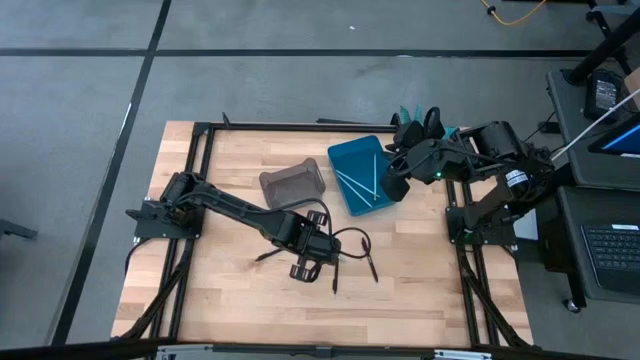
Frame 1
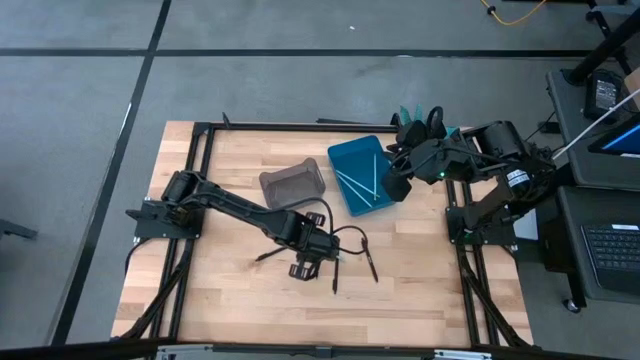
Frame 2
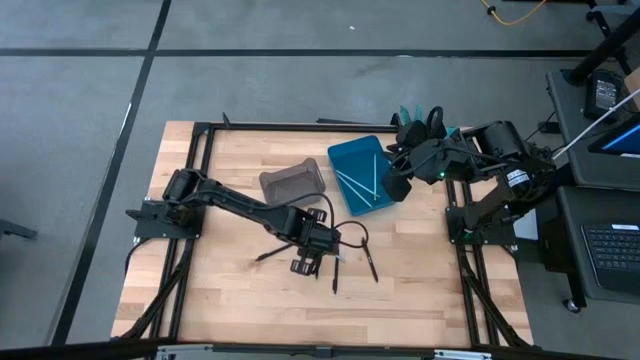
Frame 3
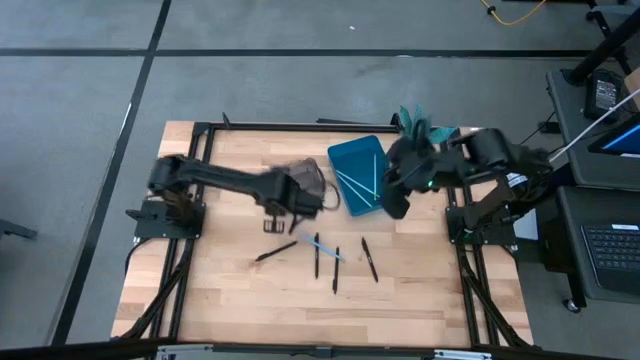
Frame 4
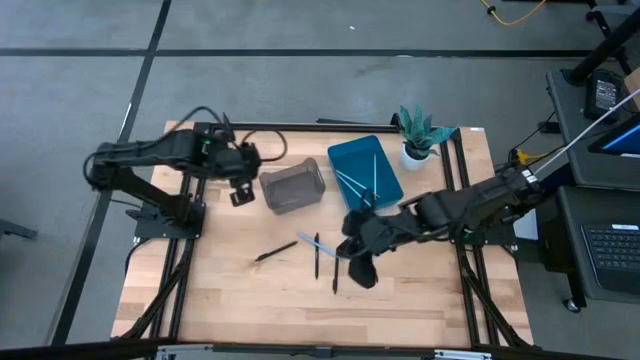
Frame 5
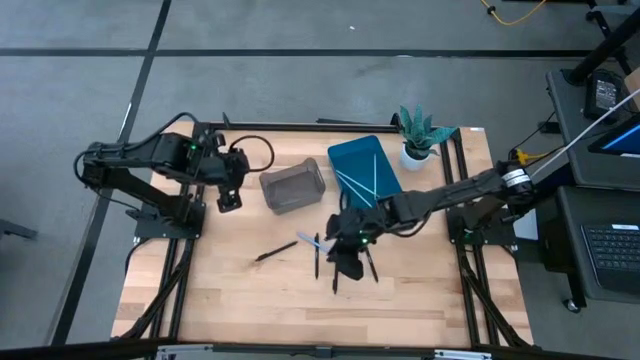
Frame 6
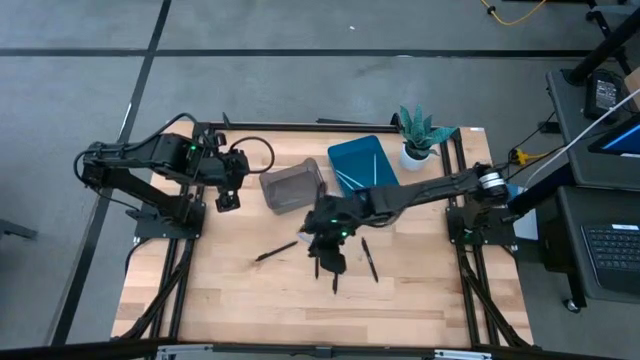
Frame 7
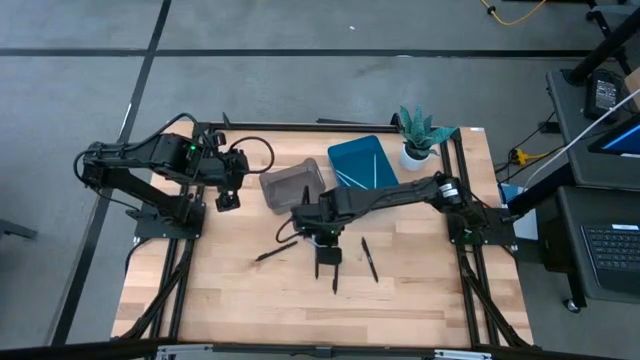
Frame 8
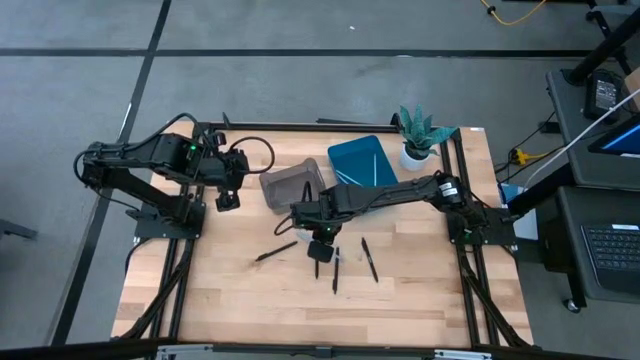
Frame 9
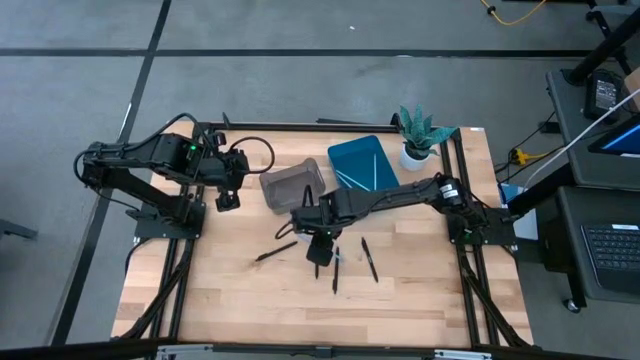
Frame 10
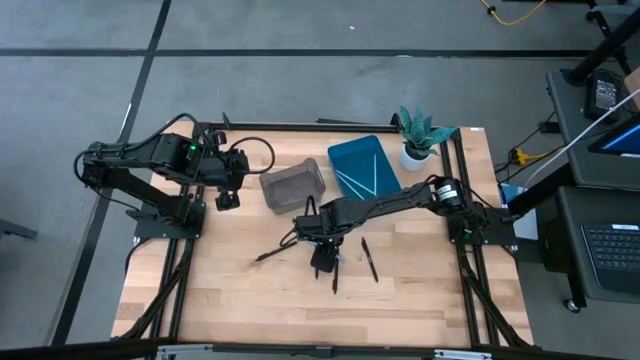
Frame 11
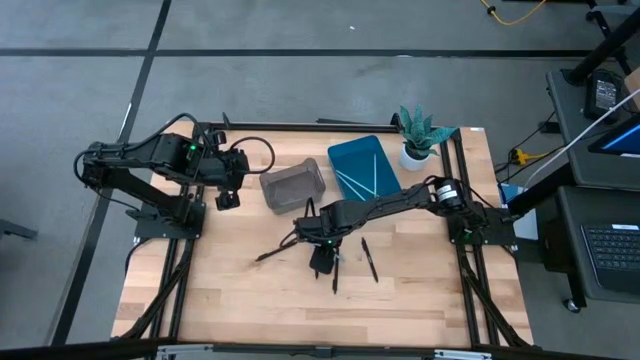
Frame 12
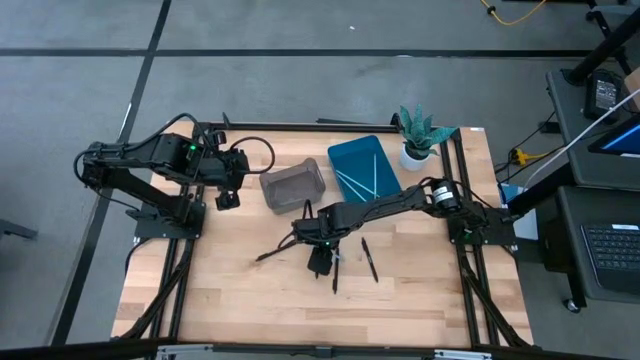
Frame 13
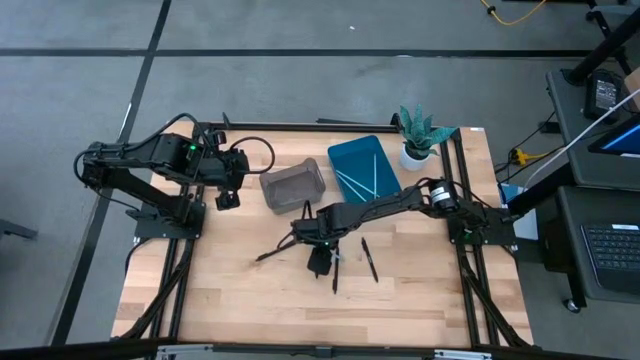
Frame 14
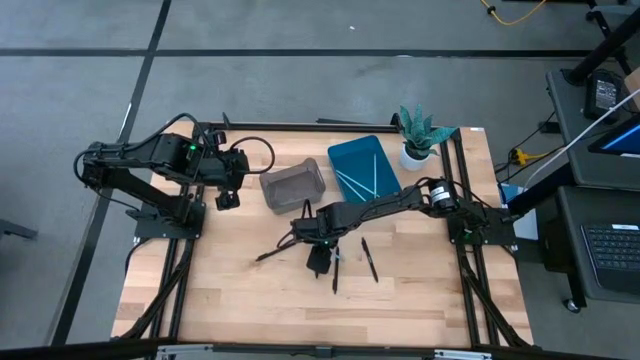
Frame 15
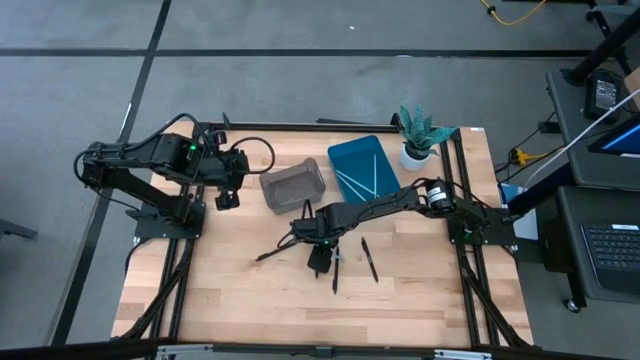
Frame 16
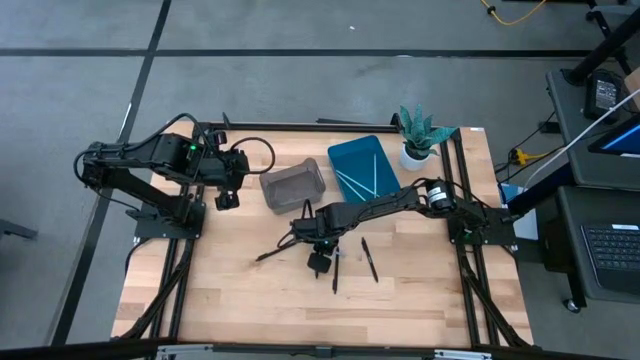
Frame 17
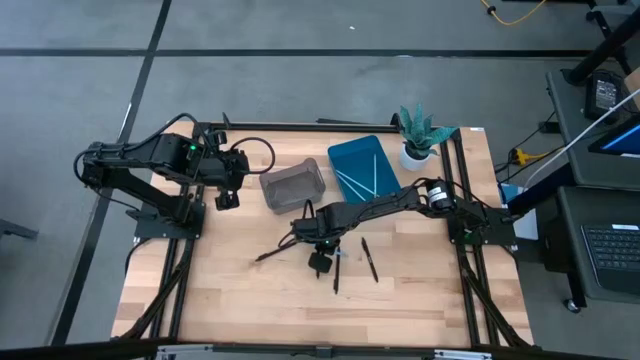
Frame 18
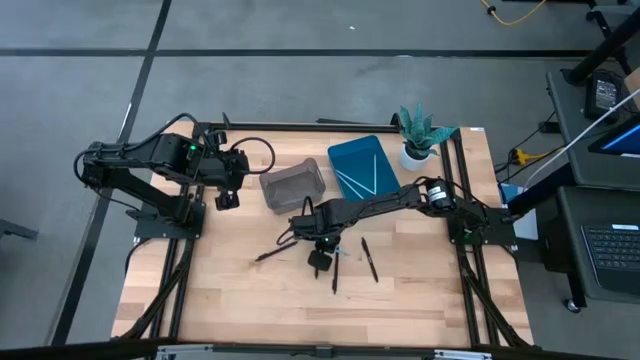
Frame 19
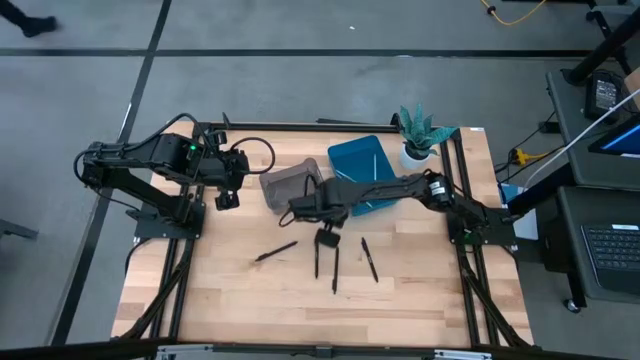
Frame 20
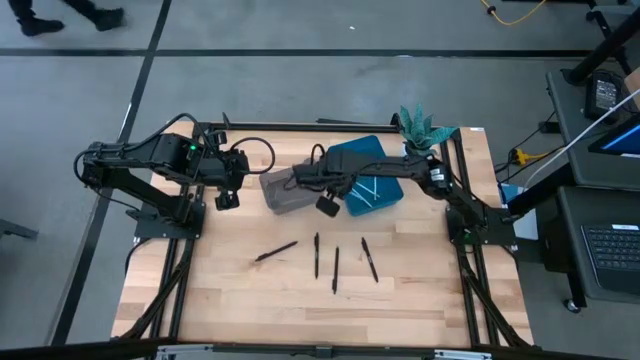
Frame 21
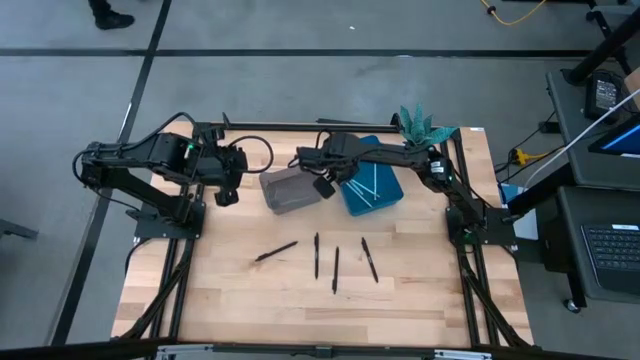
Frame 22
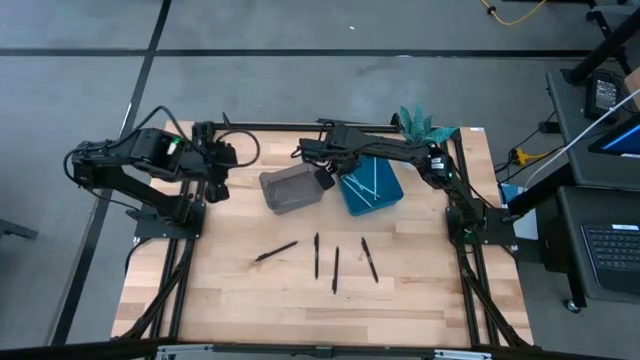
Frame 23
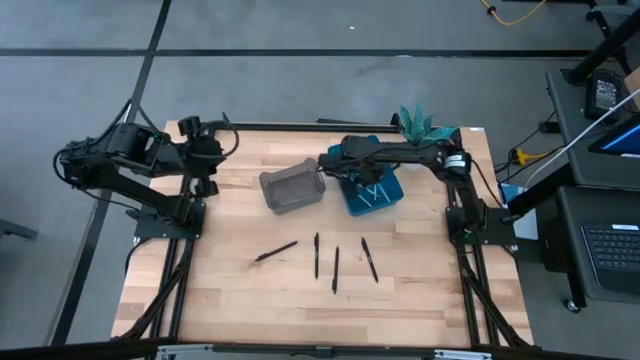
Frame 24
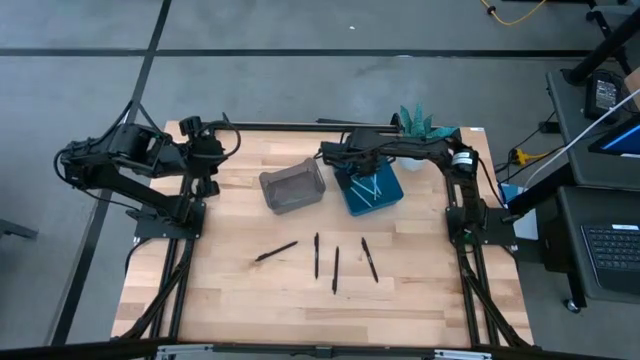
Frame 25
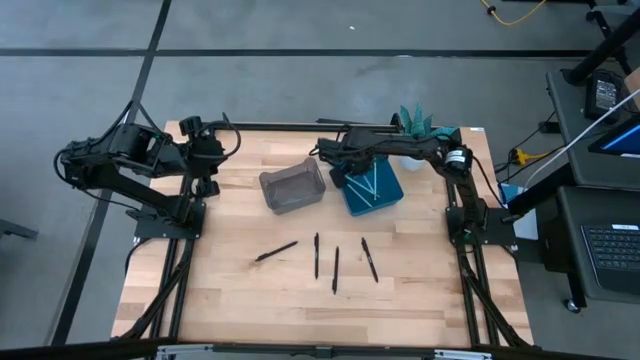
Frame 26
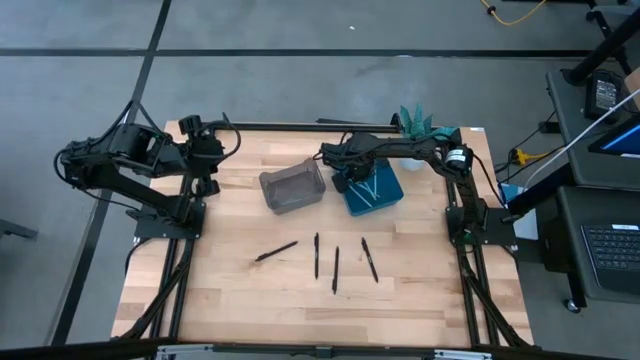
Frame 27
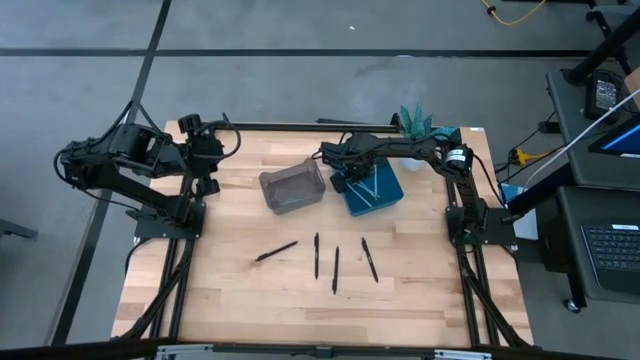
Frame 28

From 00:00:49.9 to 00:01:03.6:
Task: Sort pens & pencils
Put the blue colored pencil into the blue bin

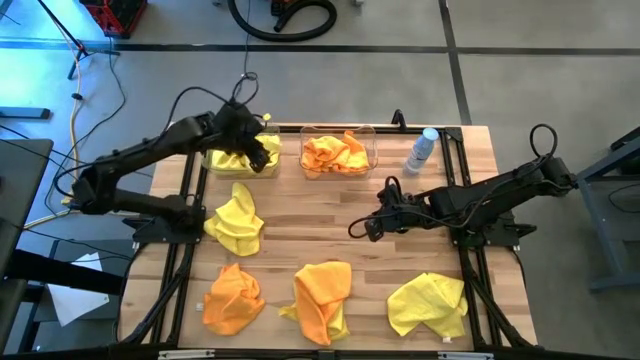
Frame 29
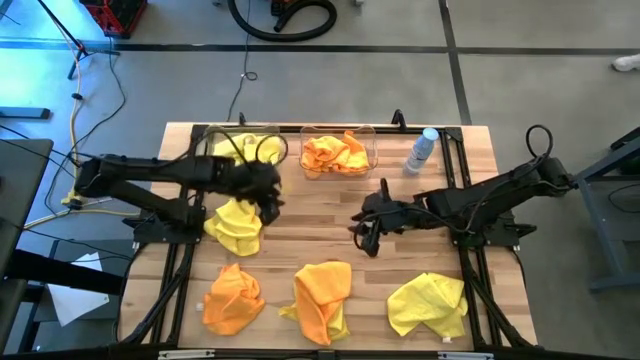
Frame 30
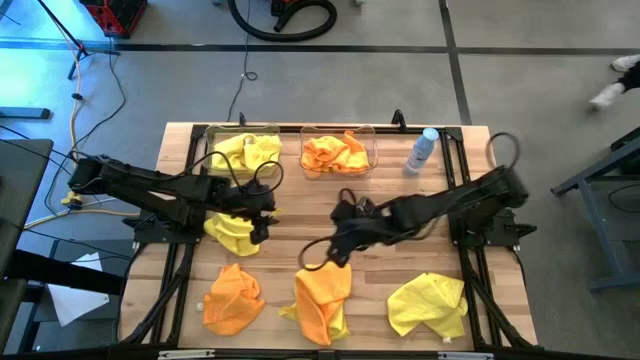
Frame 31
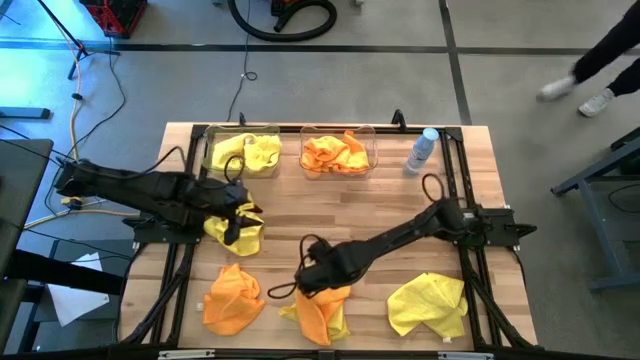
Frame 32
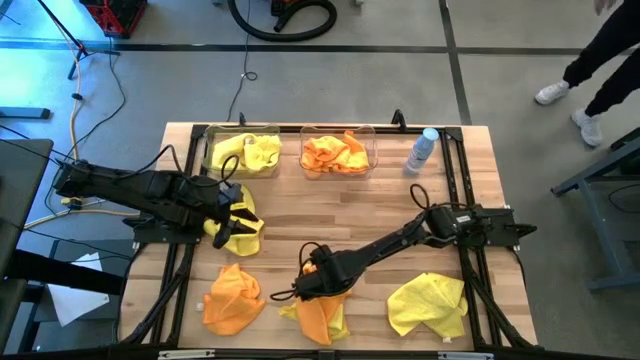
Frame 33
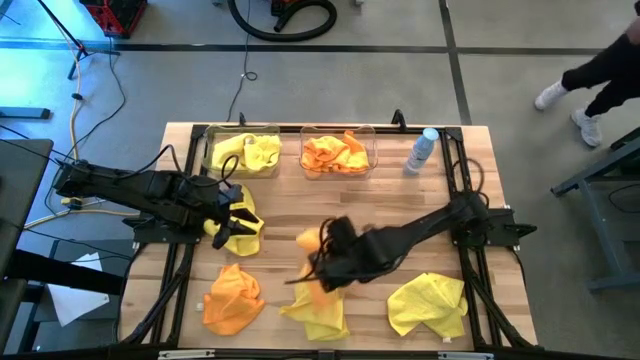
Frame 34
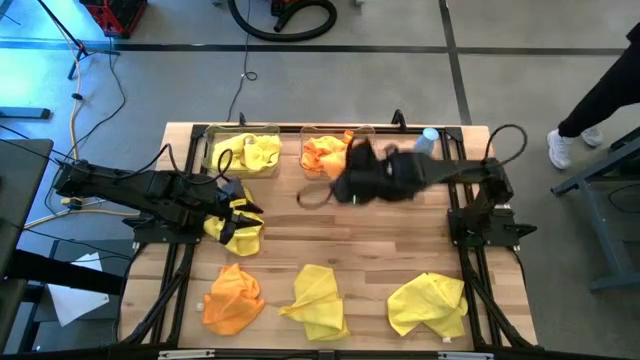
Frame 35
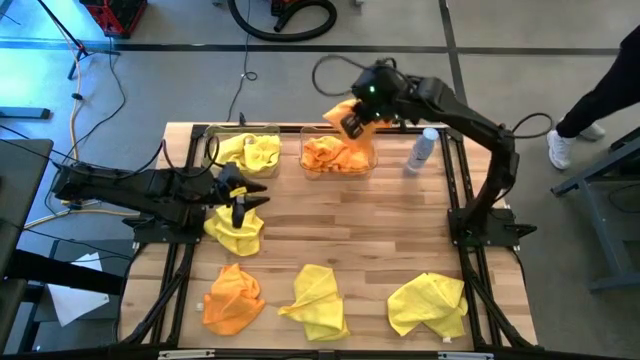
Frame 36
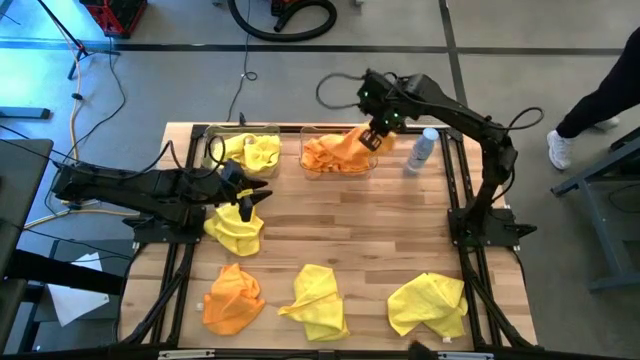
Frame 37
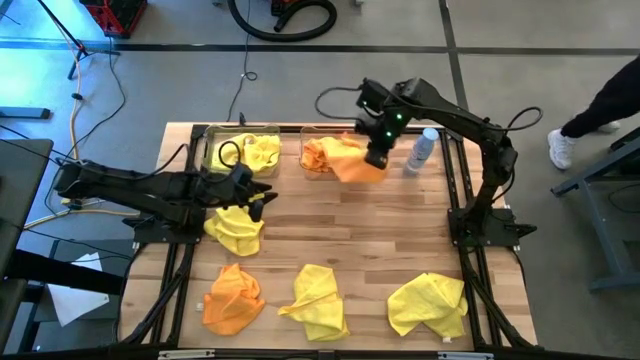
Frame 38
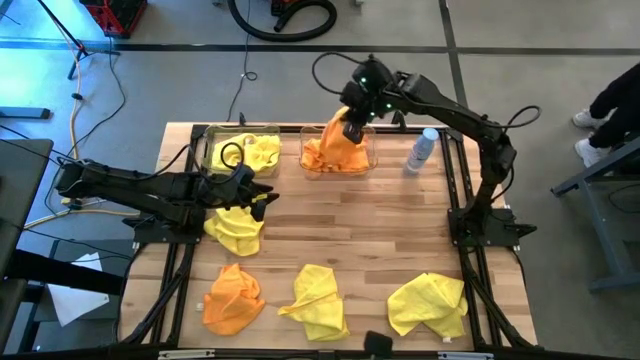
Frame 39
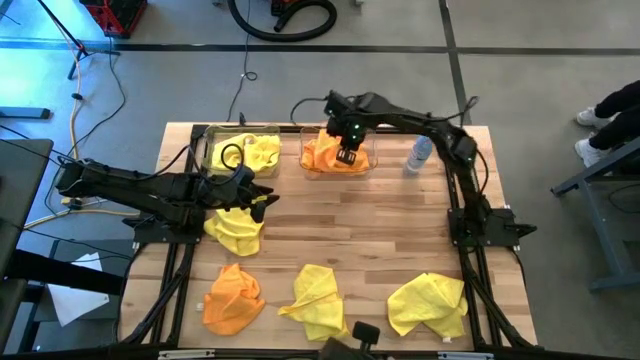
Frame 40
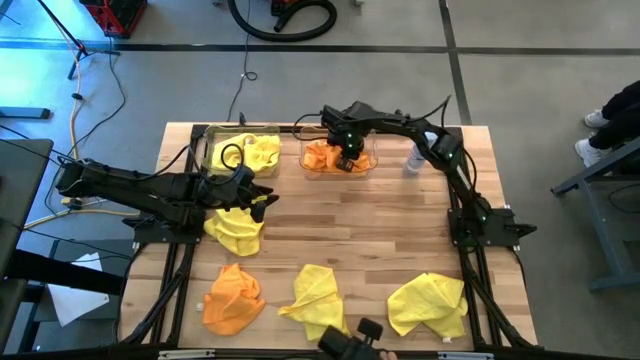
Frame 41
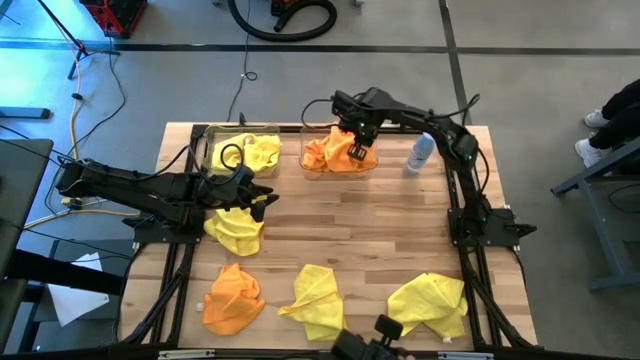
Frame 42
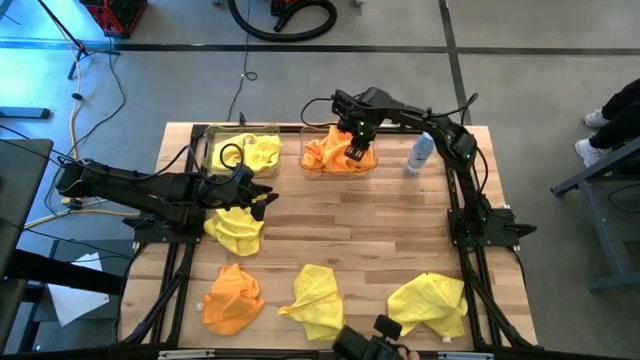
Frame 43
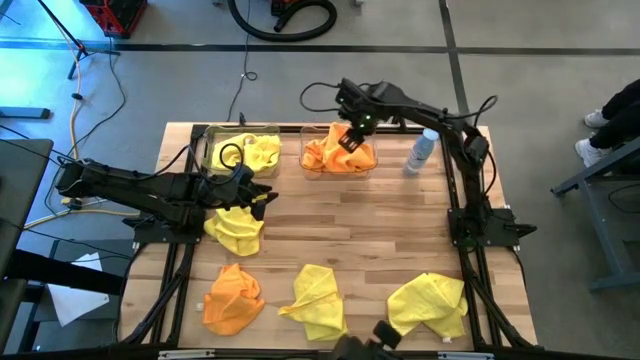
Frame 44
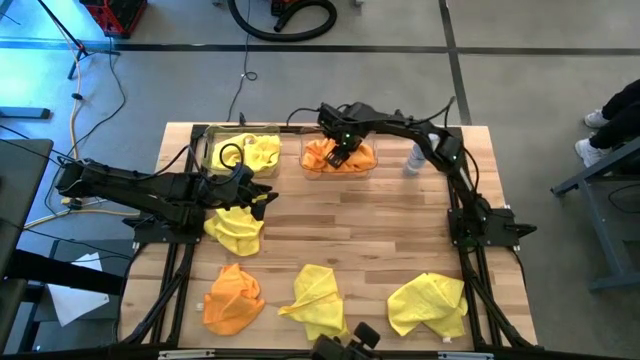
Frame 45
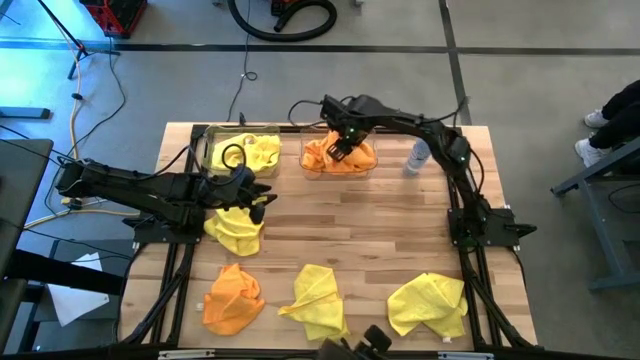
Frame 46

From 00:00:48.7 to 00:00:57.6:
Task: Sort microfiber towel by color & place in baskets
Put the orange microfiber towel into the right transparent bin
